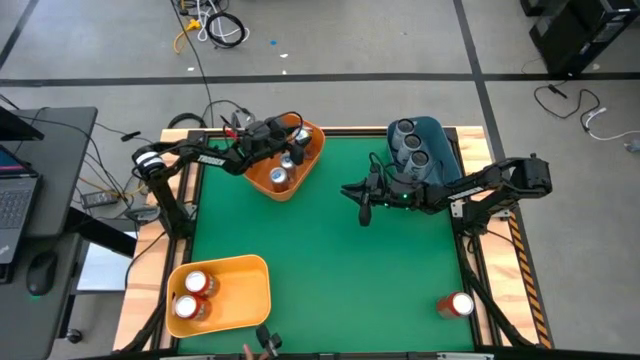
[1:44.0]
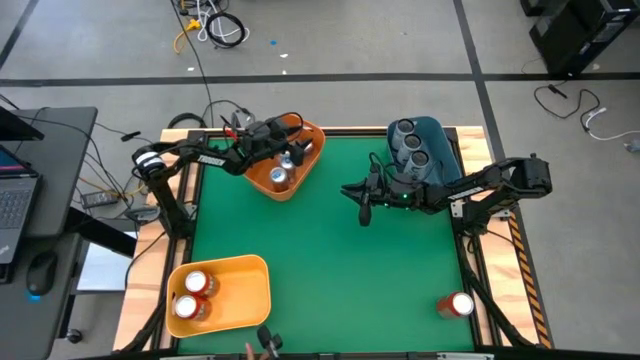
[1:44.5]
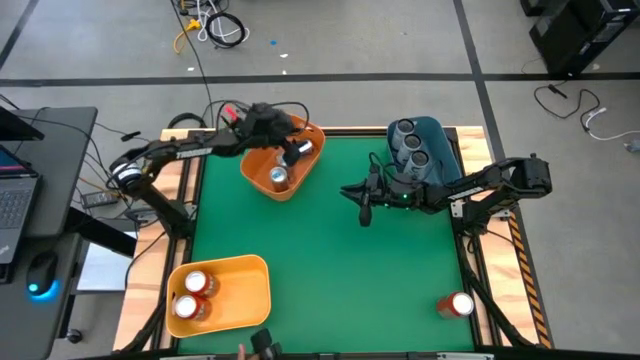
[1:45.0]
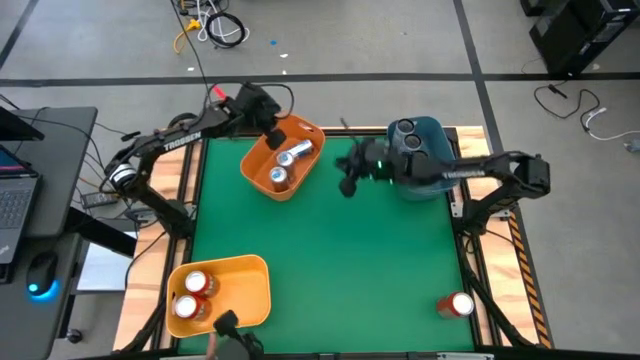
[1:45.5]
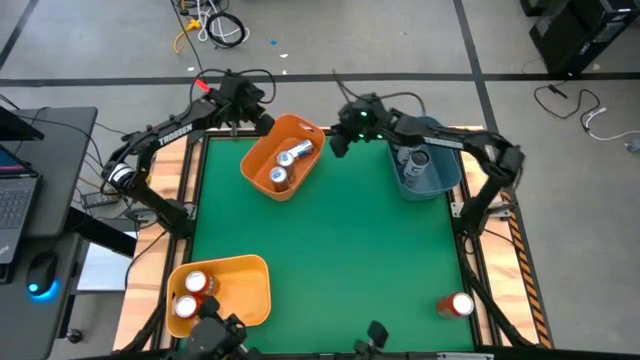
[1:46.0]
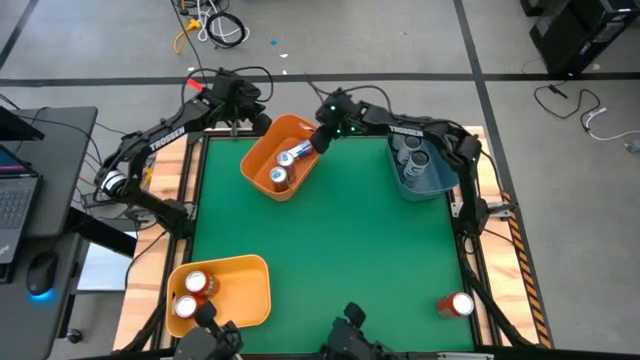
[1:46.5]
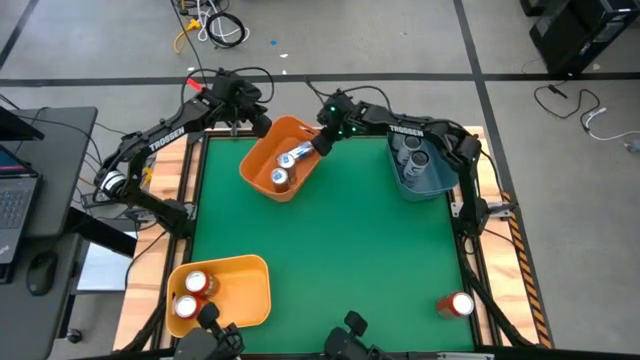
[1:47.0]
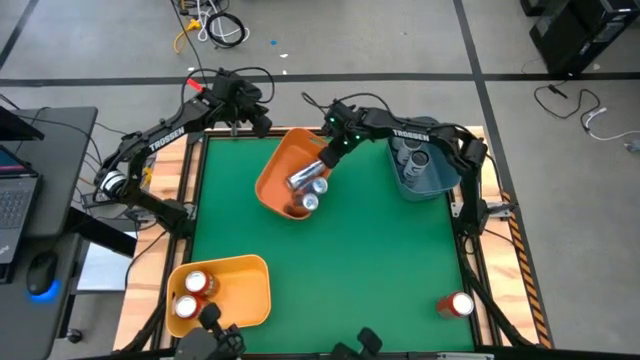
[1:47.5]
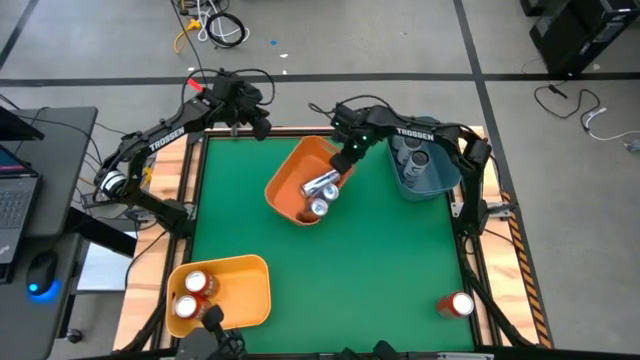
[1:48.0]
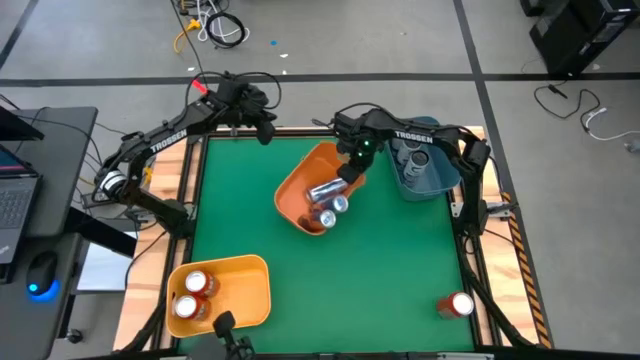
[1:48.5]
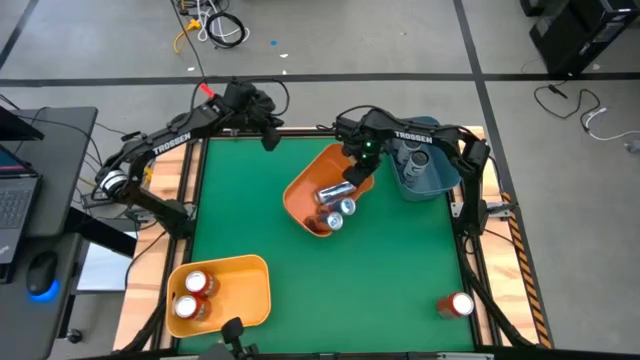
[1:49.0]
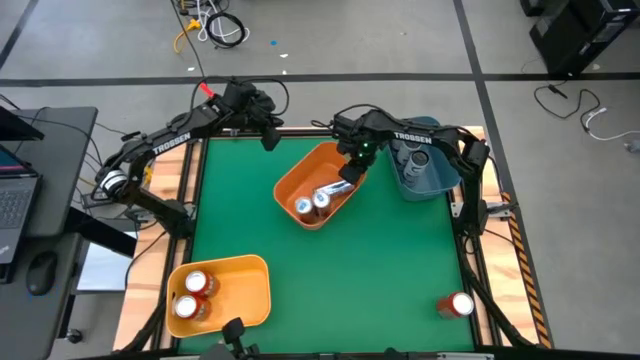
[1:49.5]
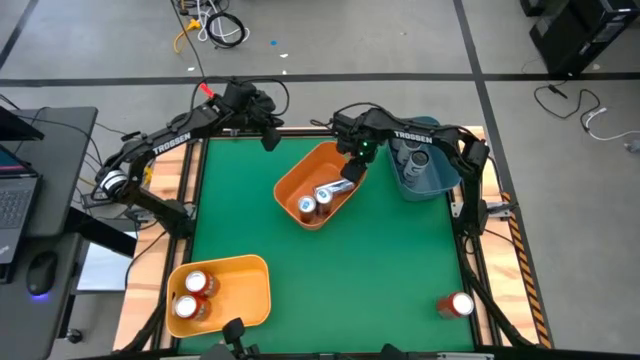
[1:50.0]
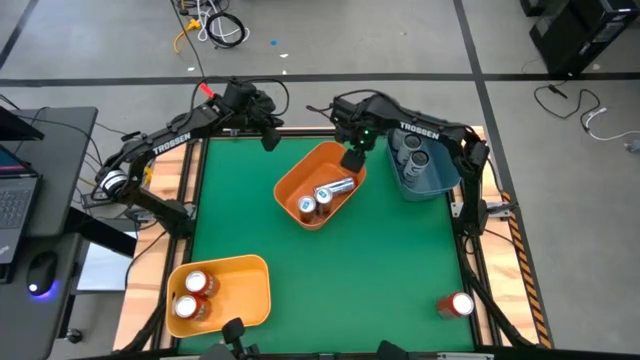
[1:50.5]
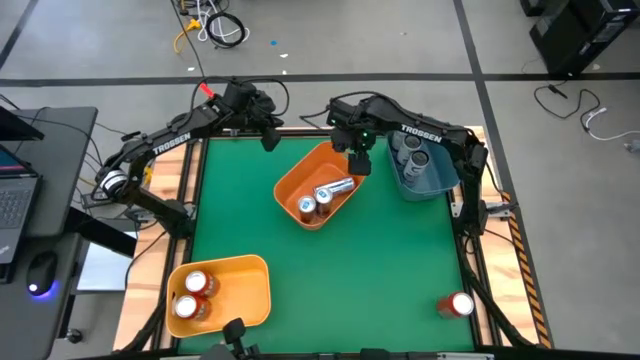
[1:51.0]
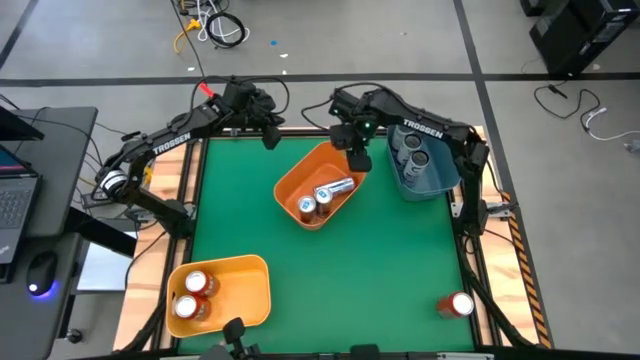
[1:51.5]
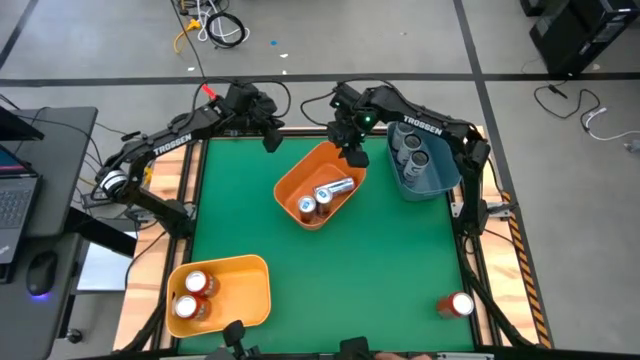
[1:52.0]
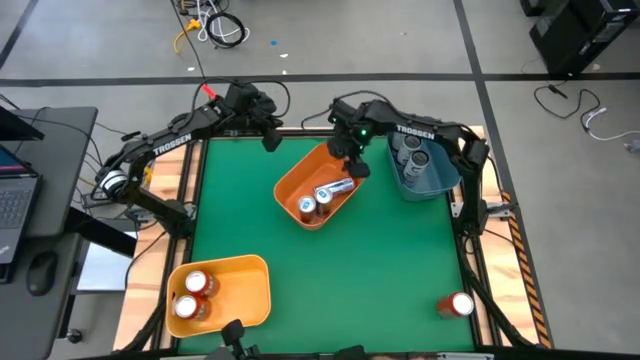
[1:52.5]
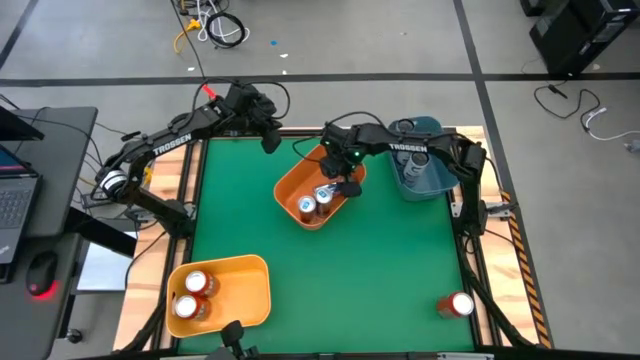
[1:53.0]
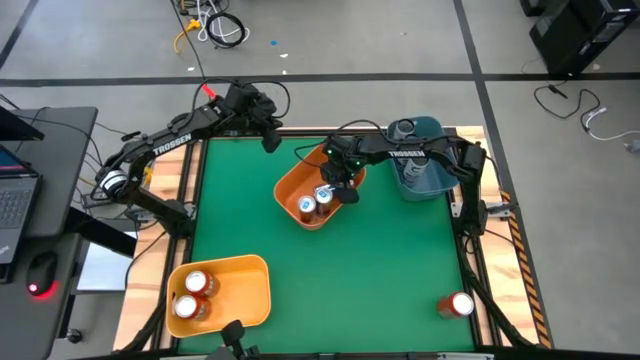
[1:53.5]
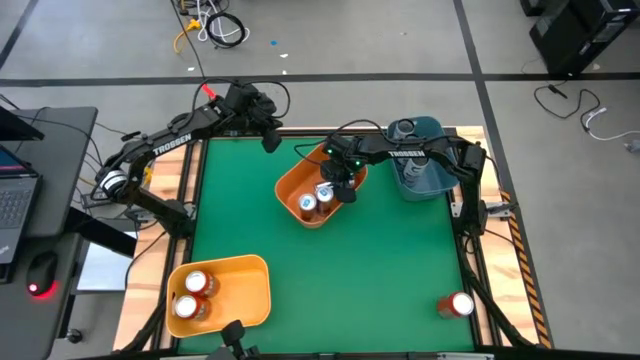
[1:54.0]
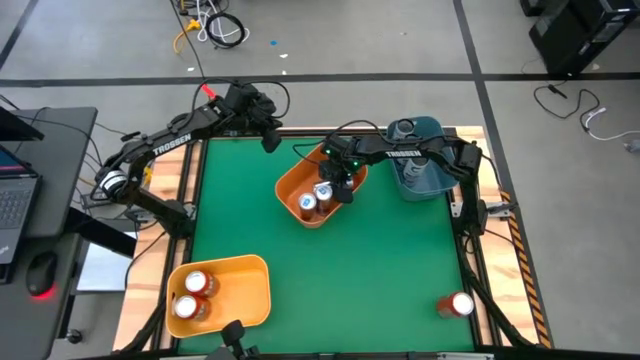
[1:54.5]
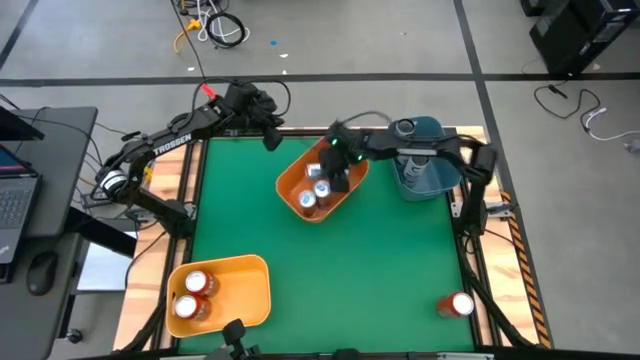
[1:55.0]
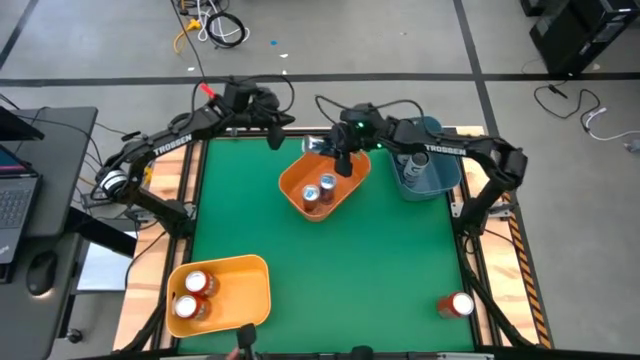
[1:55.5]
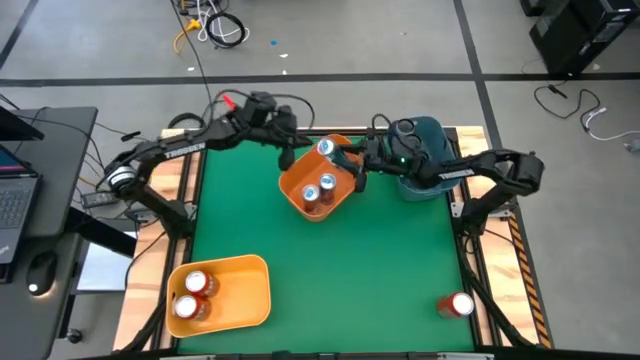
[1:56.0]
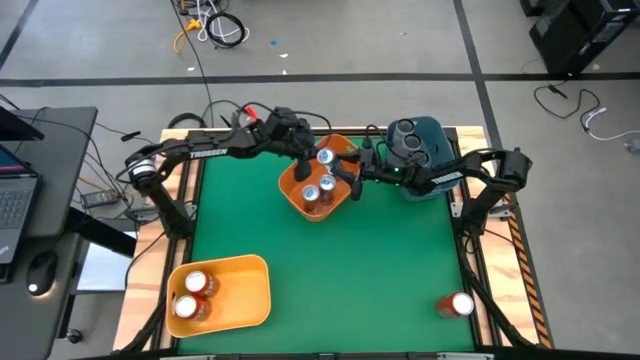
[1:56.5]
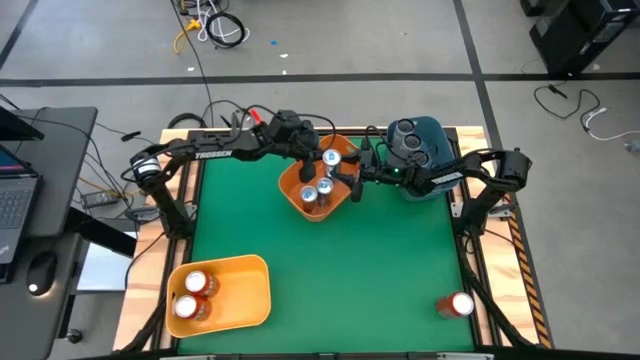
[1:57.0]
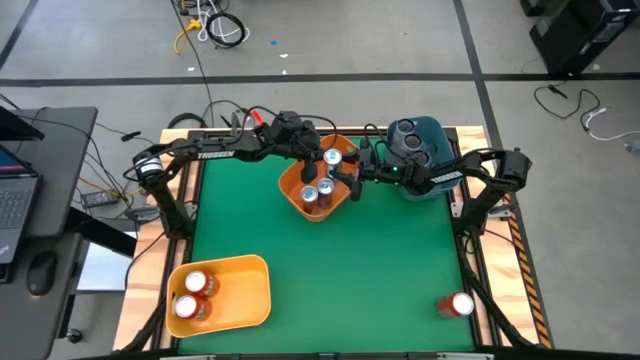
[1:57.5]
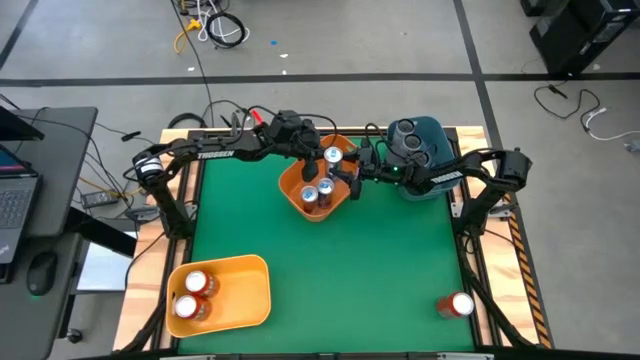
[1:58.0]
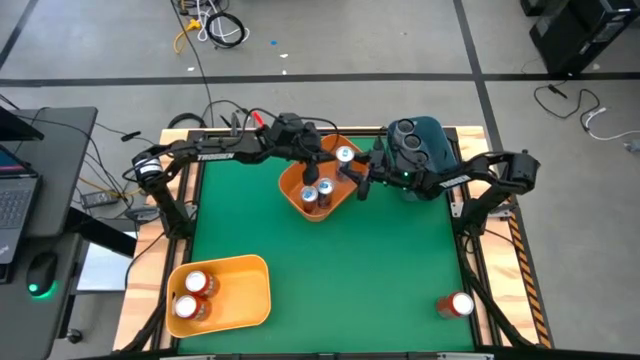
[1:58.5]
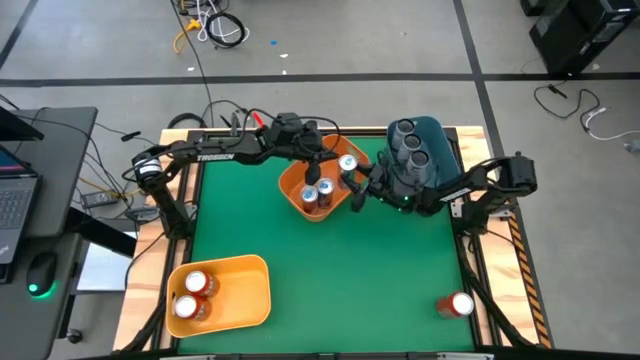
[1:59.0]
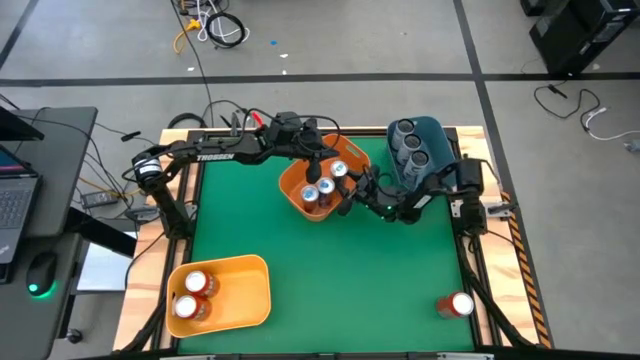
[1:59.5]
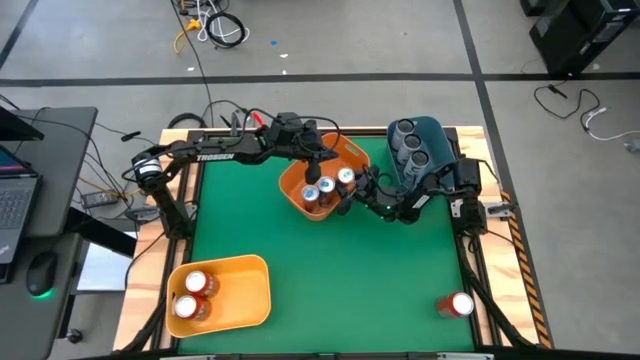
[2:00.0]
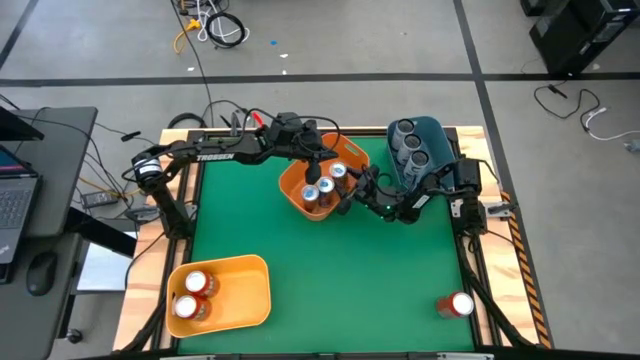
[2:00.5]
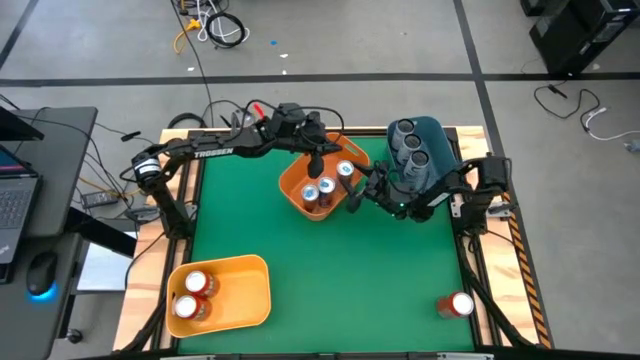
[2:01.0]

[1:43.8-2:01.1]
Task: Sort soda cans
Put the blue soda can into the orange bin
